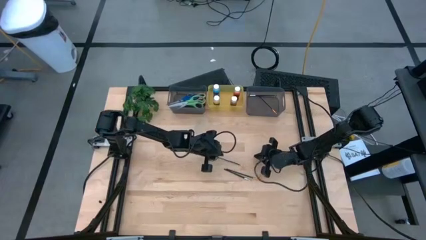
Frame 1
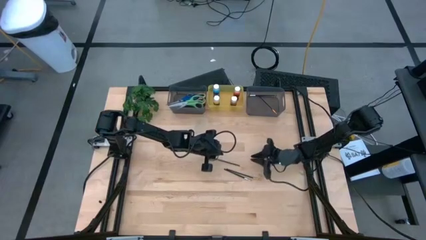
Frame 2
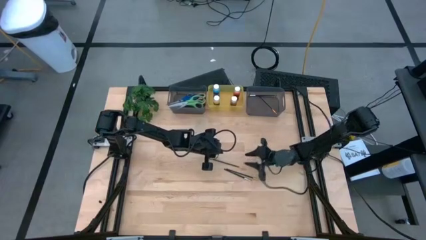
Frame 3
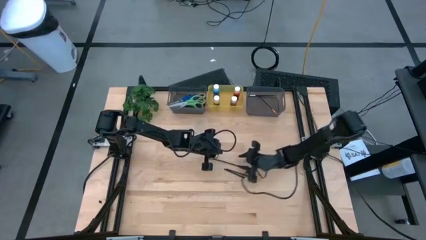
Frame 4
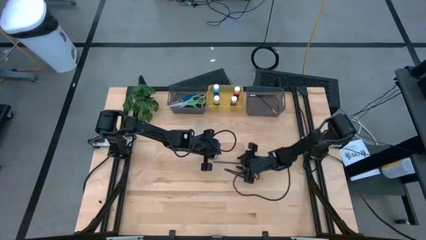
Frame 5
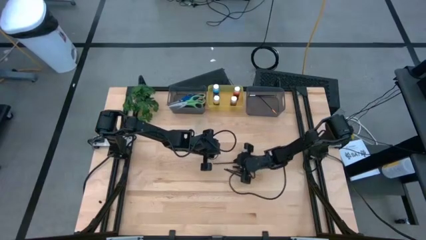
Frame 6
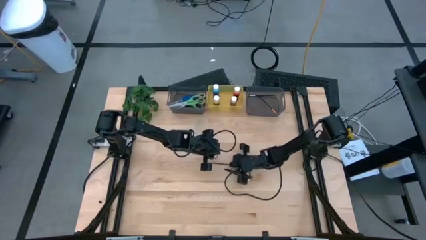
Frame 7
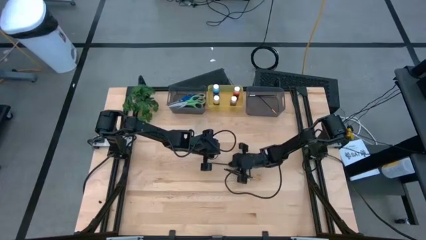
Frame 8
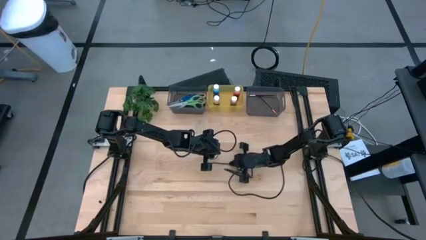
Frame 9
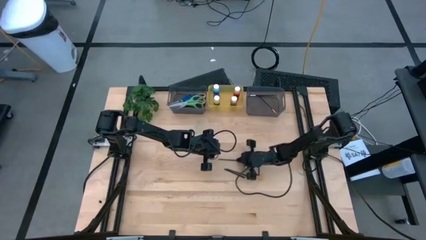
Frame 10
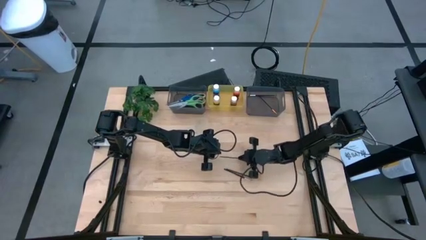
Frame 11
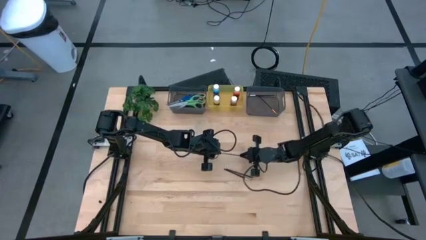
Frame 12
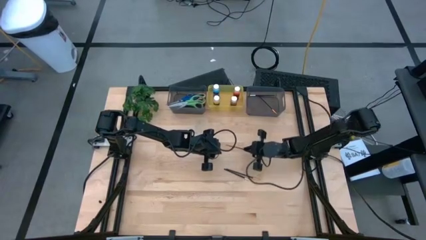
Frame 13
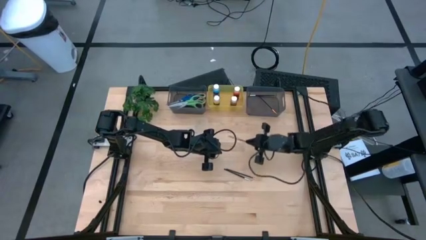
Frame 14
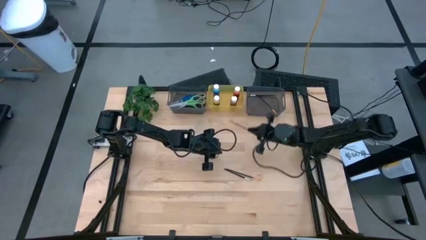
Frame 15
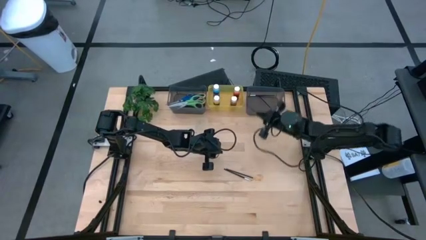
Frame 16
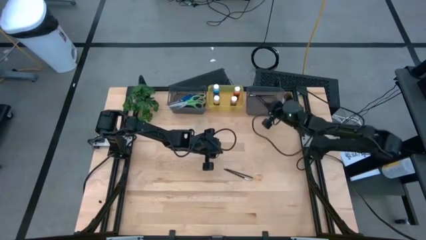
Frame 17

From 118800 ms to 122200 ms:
Task: Pick & Place Paint Supplies
Put the top gold paintbrush into the right black bin

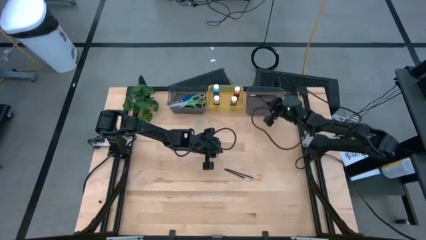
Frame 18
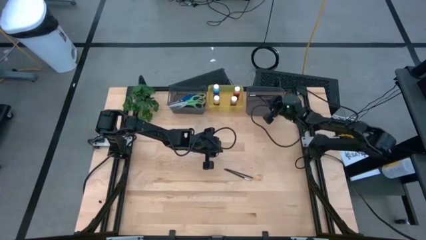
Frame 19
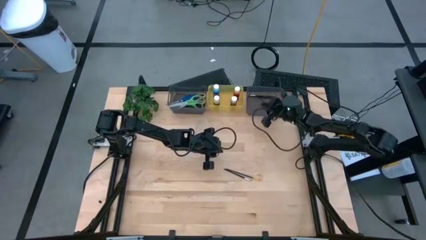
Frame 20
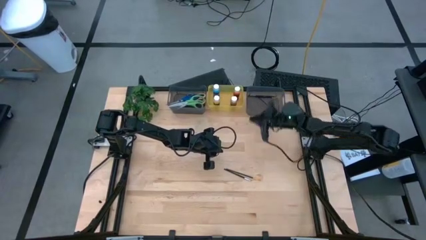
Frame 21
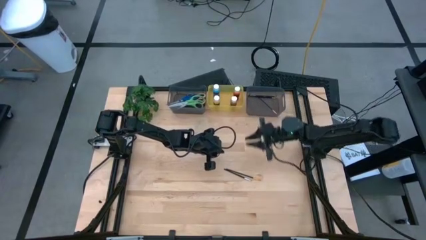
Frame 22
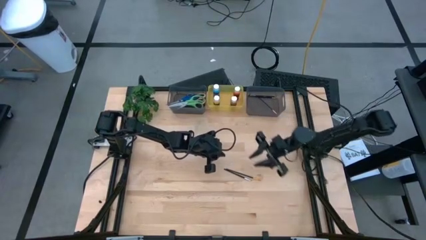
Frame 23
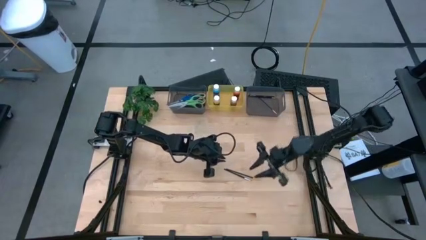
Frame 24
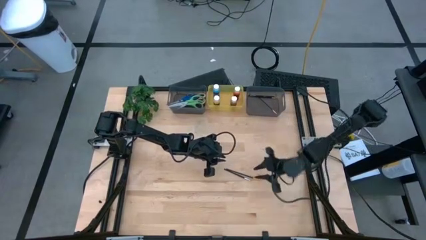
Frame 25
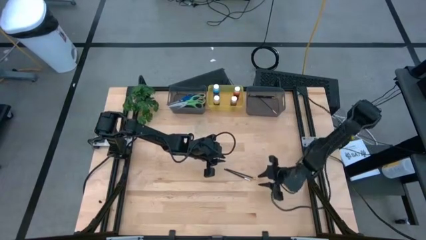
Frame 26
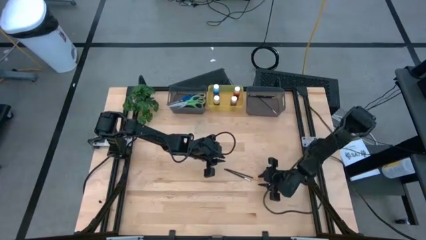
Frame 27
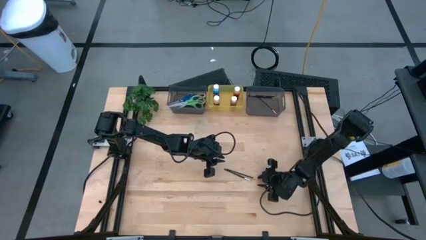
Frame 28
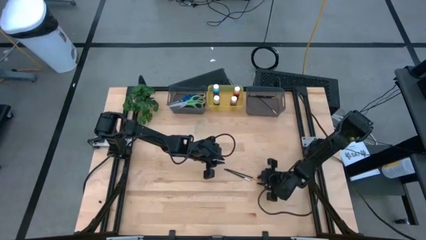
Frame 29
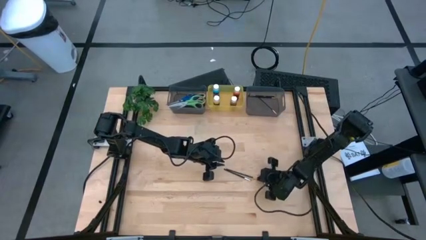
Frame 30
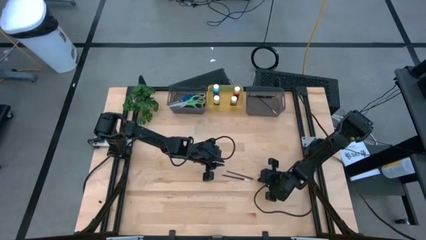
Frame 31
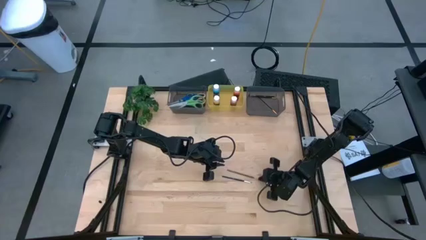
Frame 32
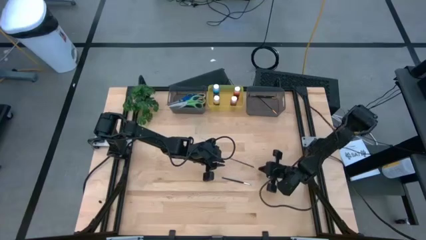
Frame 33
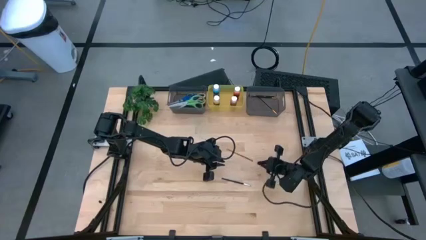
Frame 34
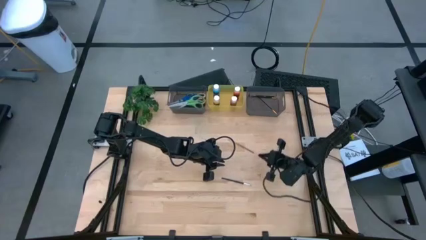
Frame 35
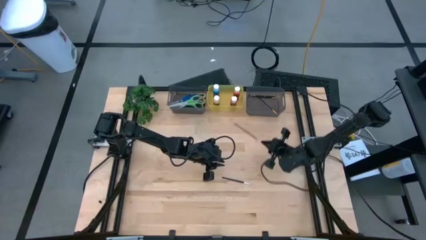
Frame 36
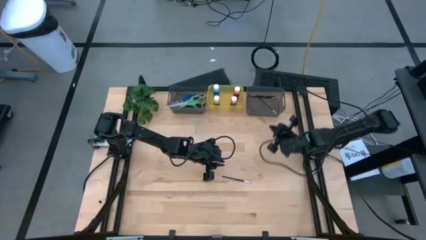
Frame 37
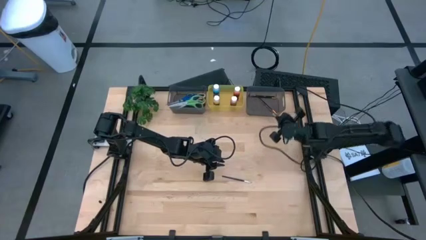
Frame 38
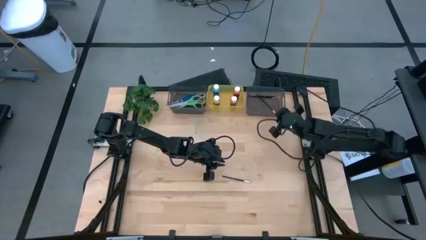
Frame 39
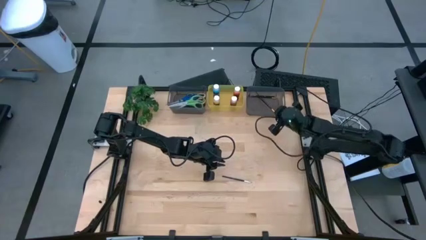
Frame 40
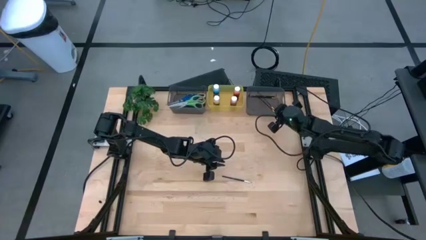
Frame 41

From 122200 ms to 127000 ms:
Put the gold paintbrush into the right black bin

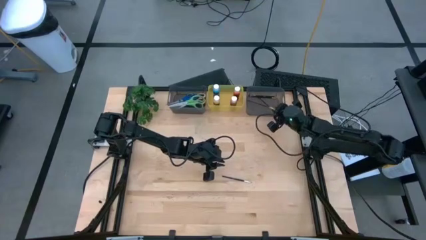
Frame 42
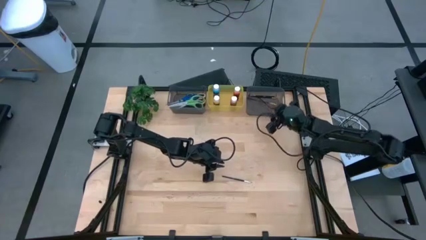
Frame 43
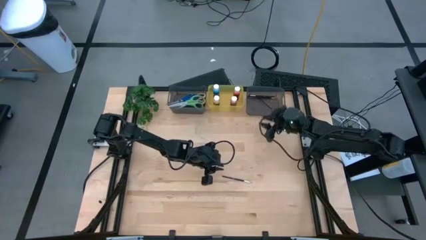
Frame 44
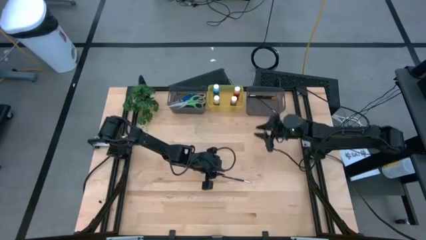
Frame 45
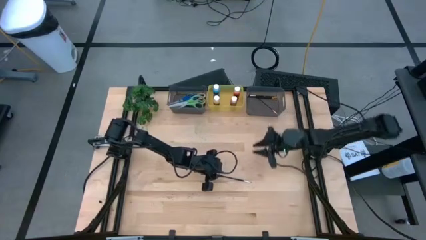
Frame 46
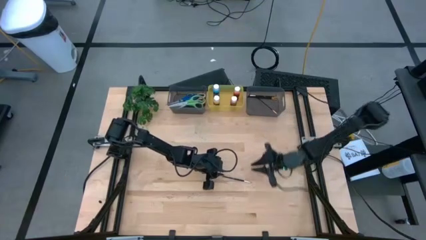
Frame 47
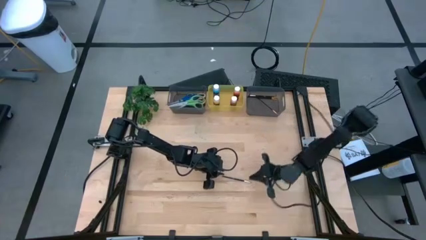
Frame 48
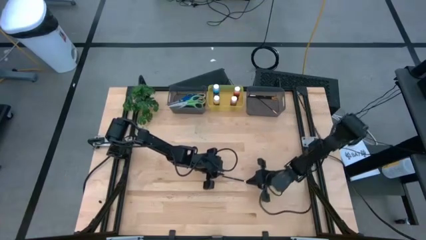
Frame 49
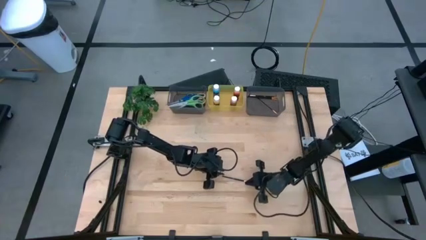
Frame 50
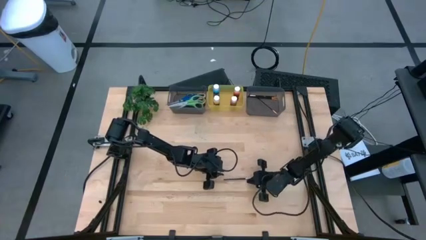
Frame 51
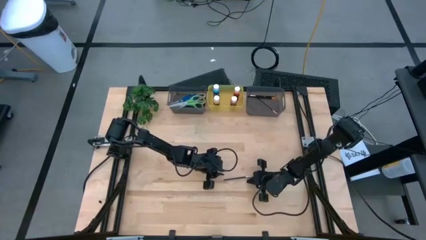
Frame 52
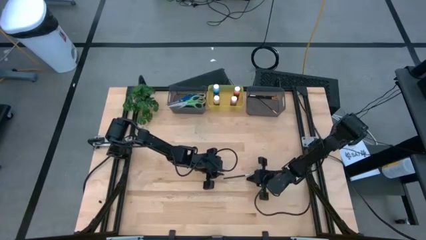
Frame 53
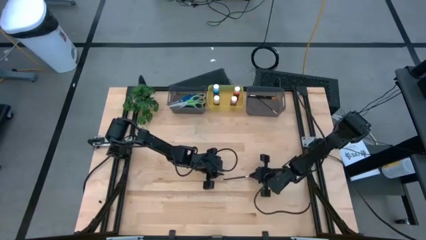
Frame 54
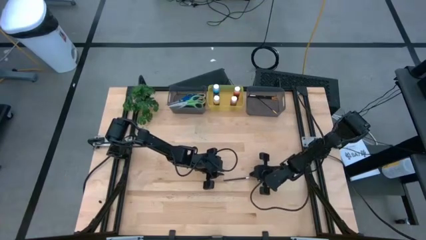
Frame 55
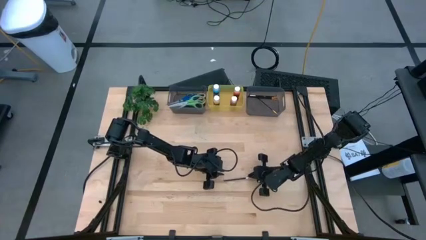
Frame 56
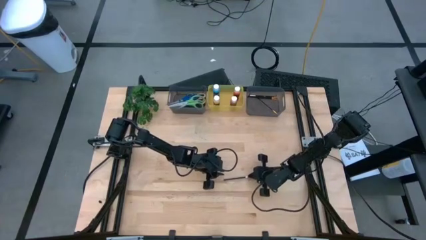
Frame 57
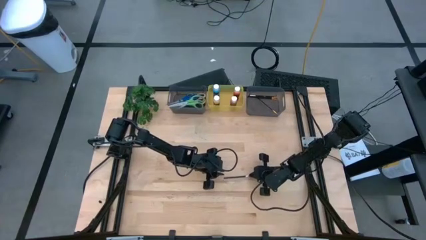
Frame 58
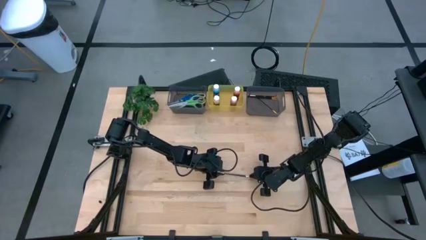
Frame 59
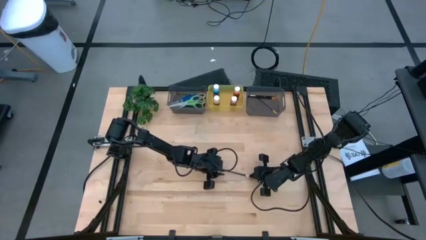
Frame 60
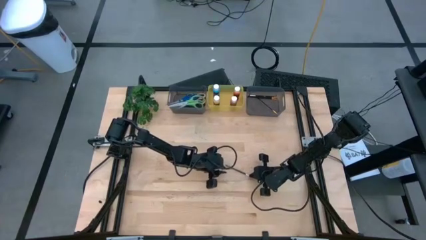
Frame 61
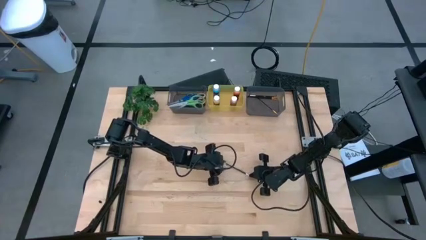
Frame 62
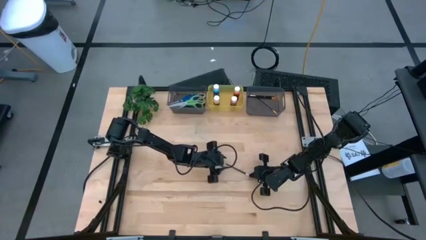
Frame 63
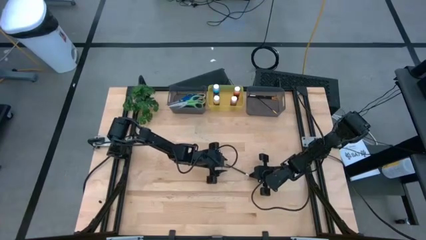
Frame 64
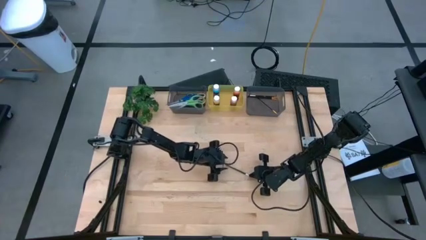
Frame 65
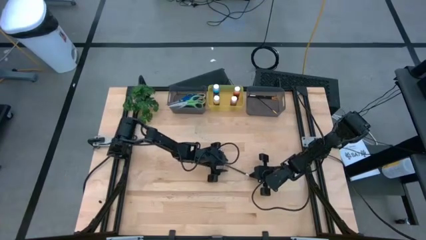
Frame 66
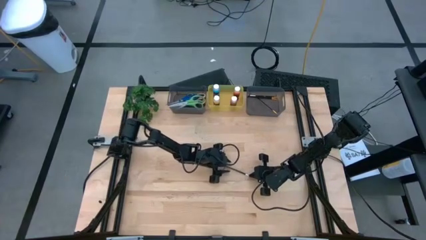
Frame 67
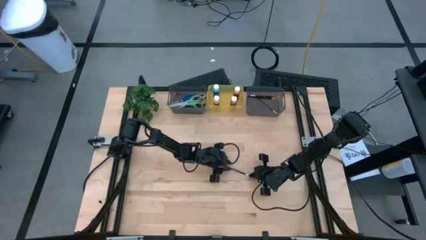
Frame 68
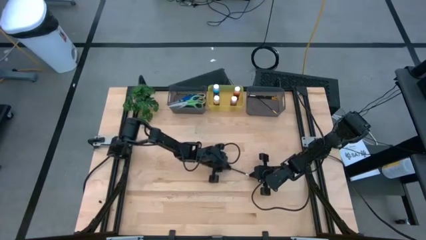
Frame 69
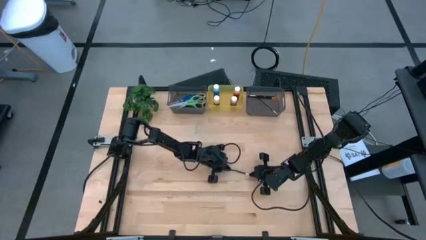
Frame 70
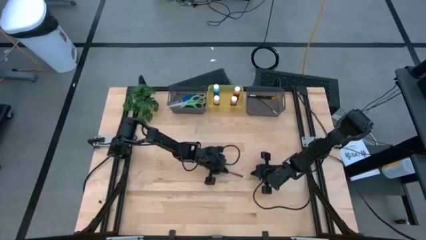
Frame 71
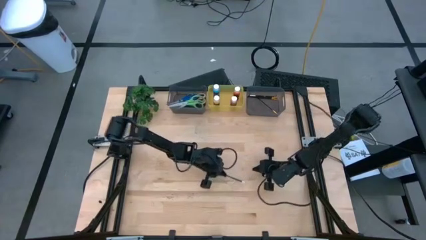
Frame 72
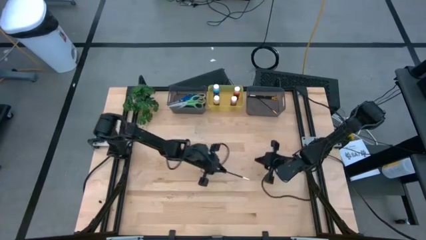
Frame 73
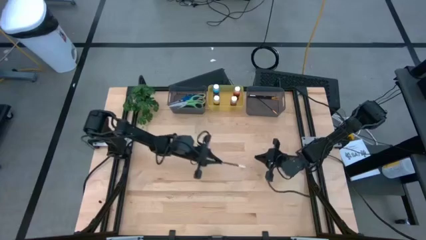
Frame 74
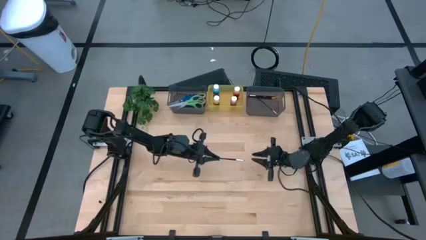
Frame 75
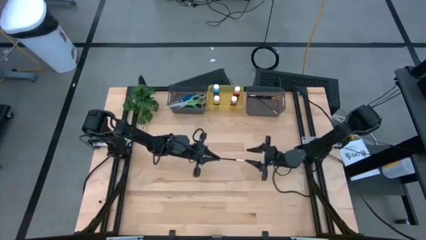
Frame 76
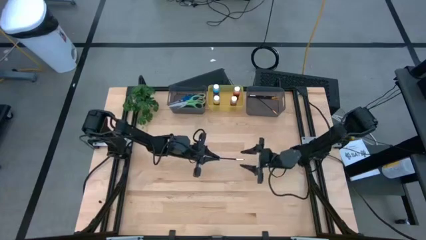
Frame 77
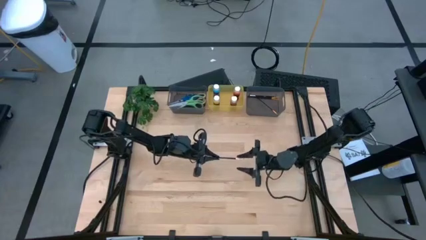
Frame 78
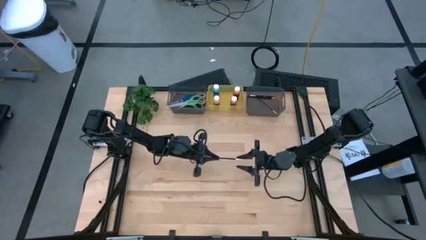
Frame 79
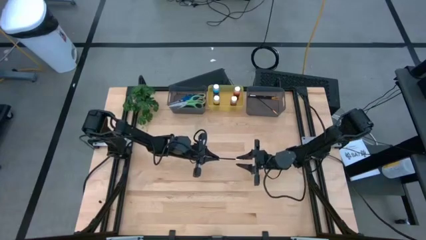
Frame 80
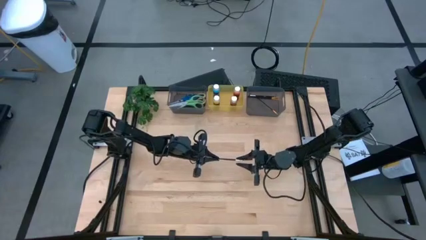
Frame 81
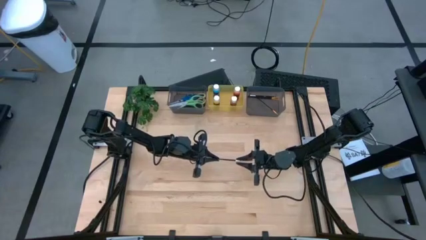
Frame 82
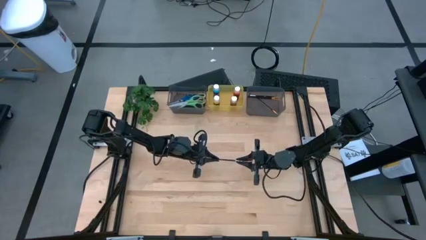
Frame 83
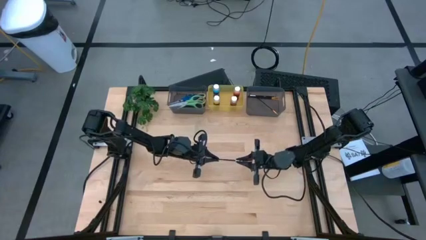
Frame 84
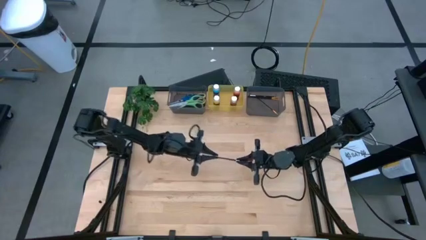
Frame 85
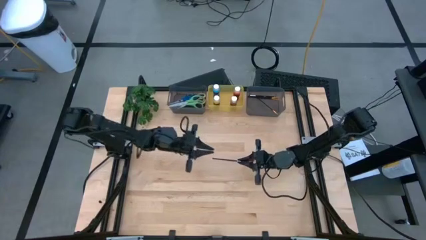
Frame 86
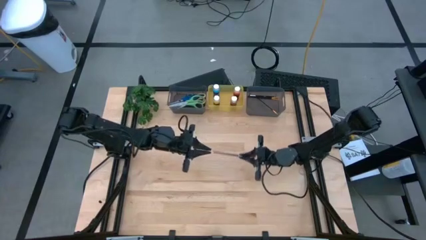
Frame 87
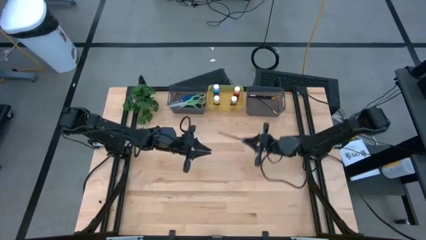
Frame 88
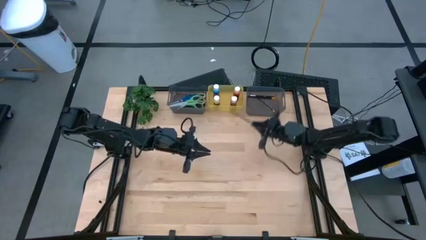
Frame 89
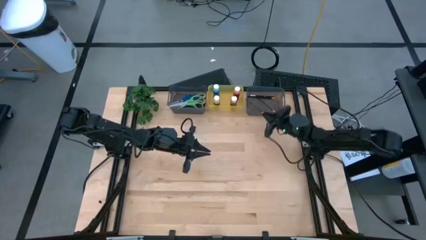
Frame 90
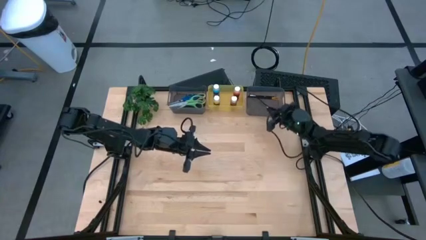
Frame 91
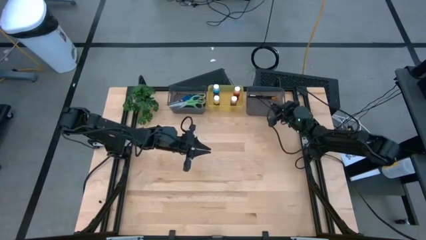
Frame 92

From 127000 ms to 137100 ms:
Put the silver paintbrush into the right black bin
